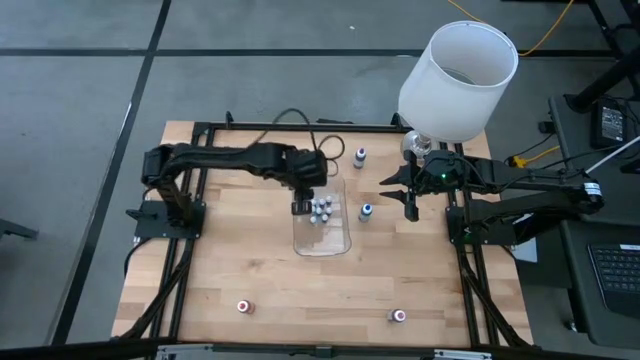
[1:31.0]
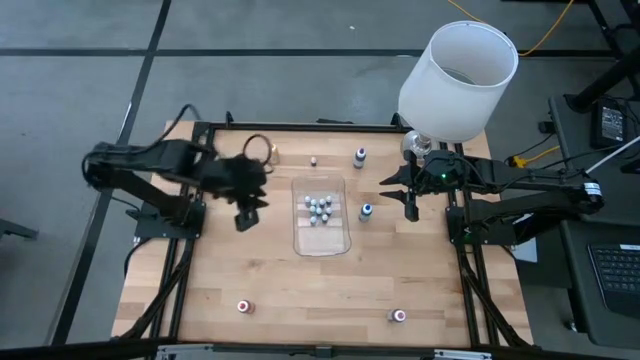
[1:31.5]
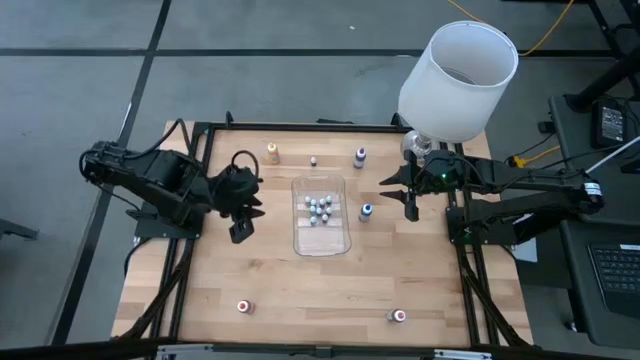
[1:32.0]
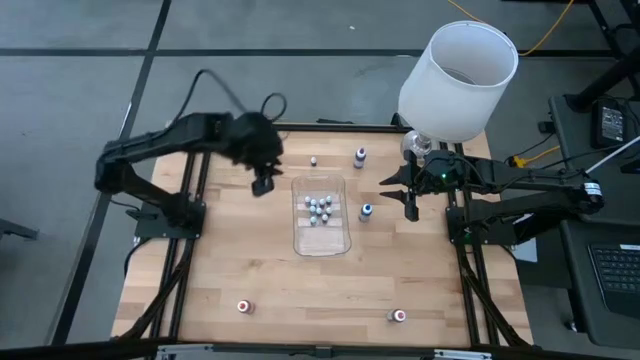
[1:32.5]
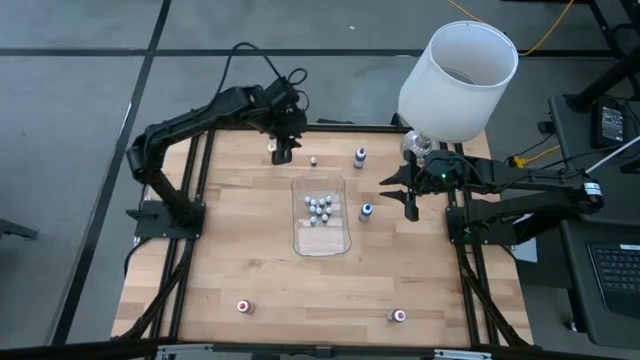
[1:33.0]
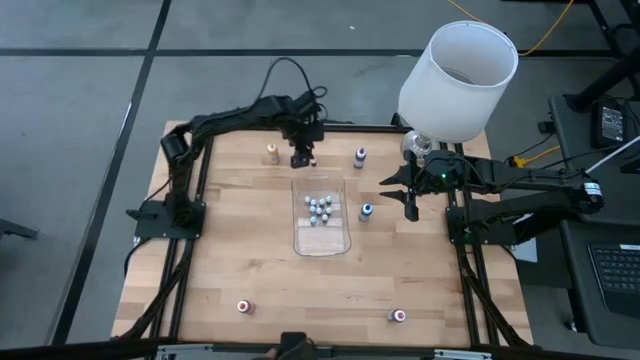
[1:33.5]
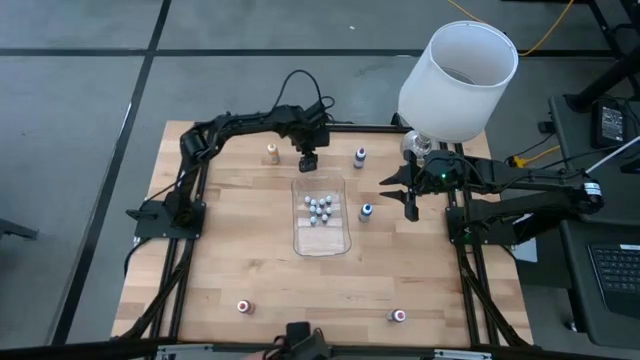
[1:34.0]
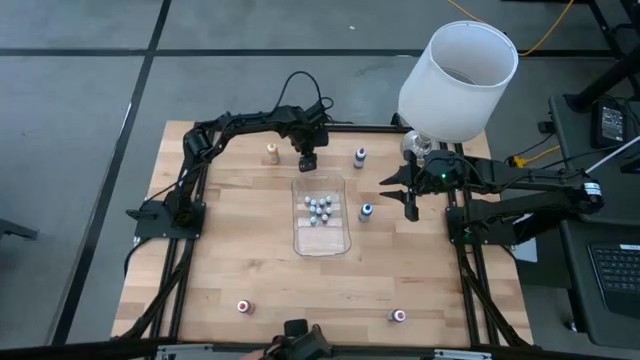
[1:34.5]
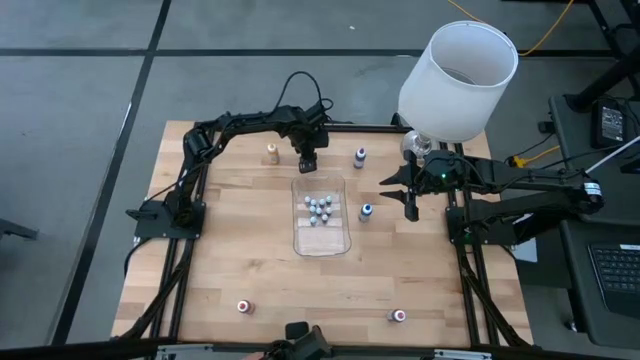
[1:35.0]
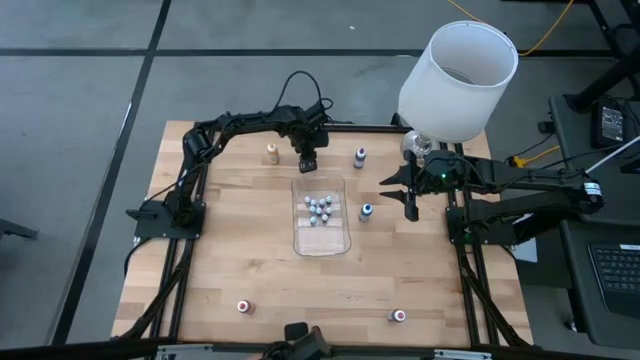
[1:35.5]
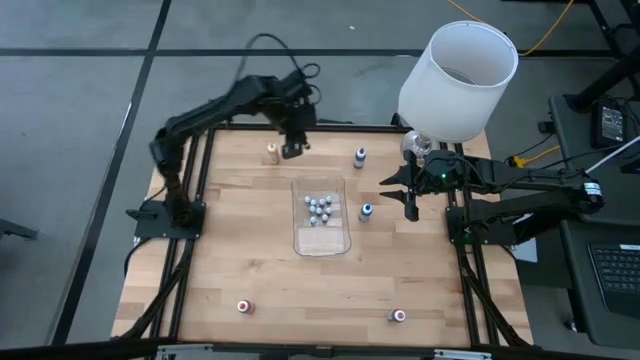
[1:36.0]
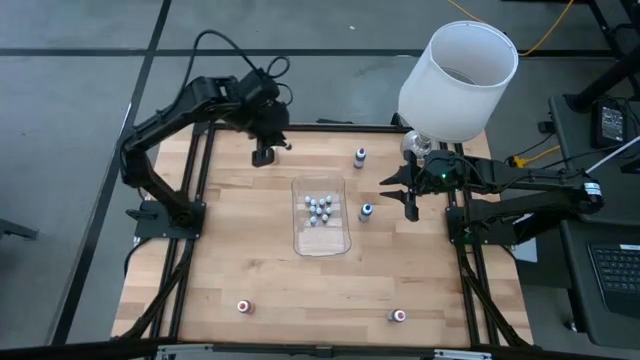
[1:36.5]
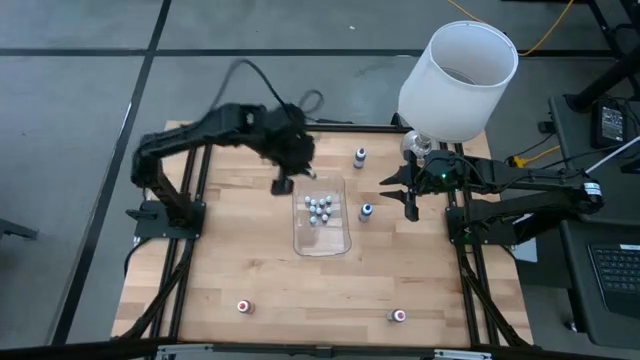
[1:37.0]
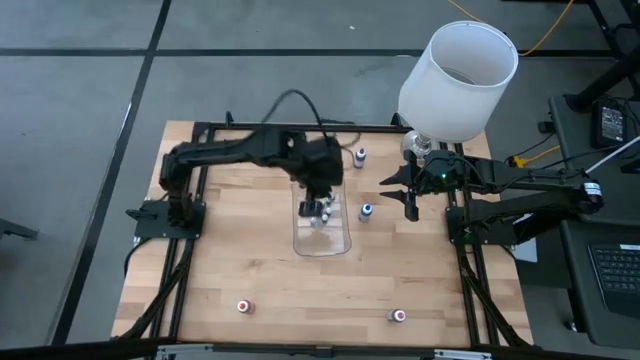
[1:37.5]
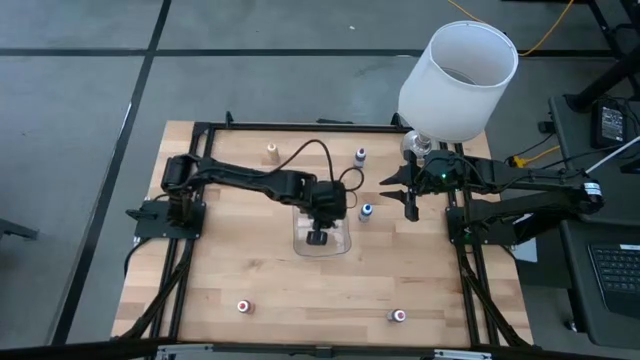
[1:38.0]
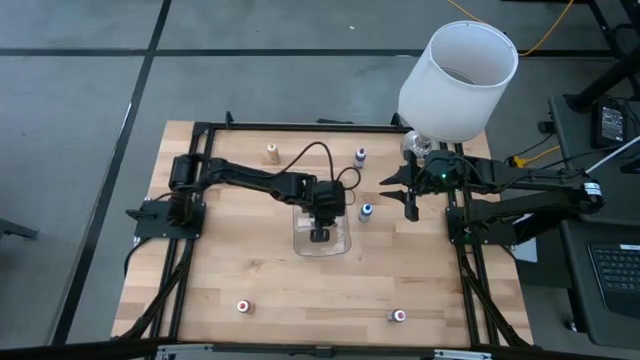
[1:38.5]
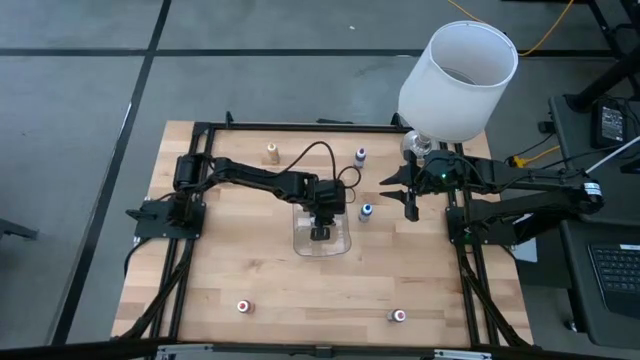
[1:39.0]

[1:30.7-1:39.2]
Task: Pick & Place food coloring
Put the small blue food coloring into the transparent bin

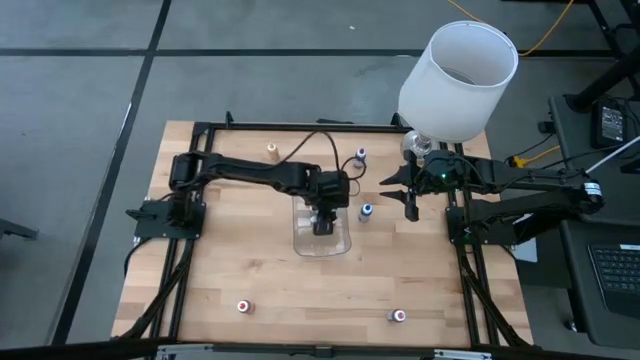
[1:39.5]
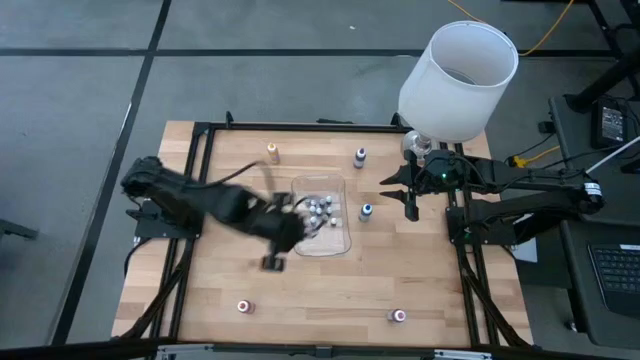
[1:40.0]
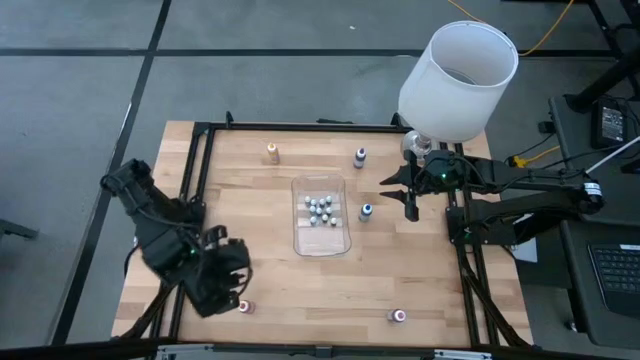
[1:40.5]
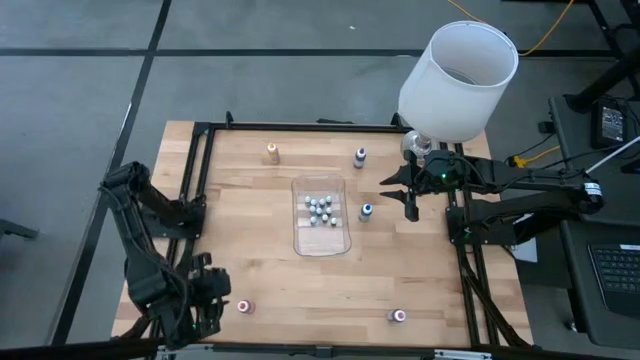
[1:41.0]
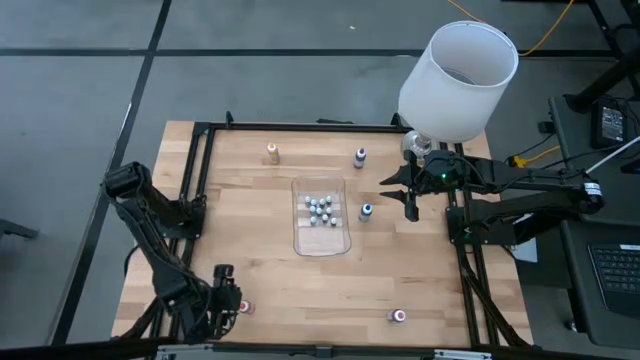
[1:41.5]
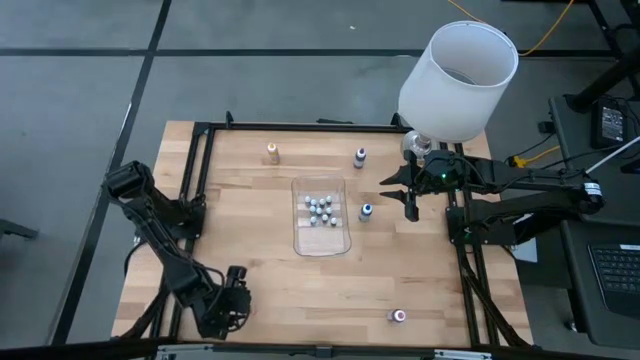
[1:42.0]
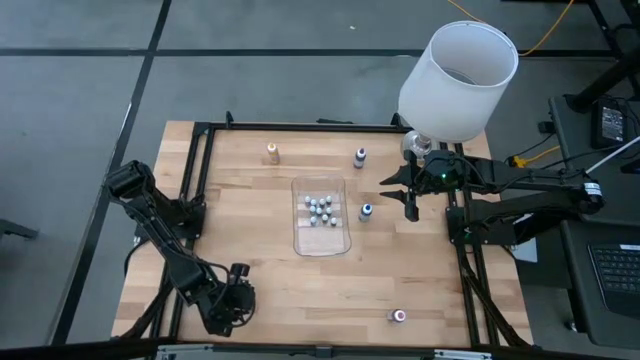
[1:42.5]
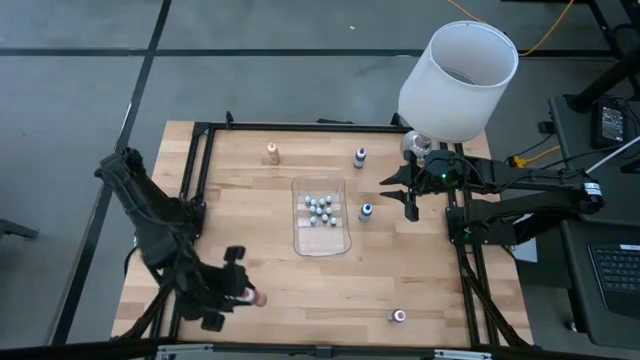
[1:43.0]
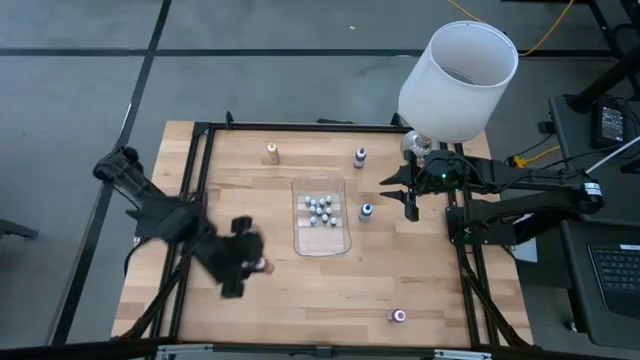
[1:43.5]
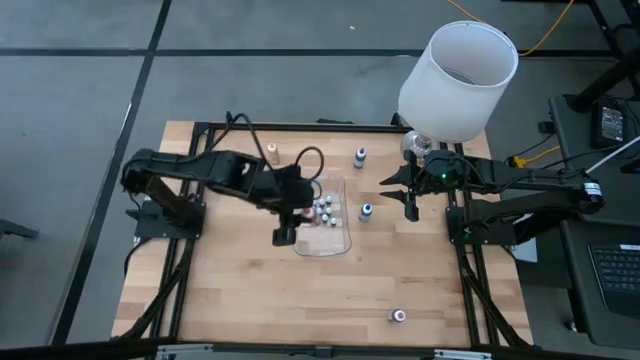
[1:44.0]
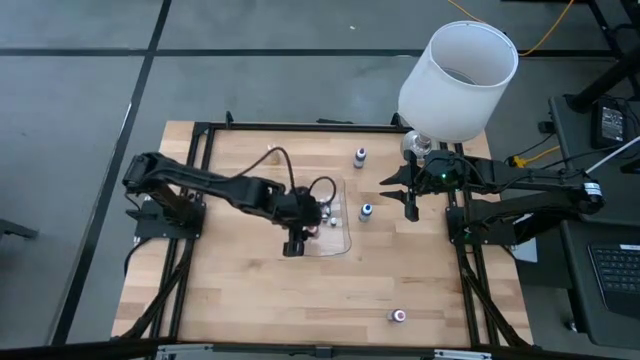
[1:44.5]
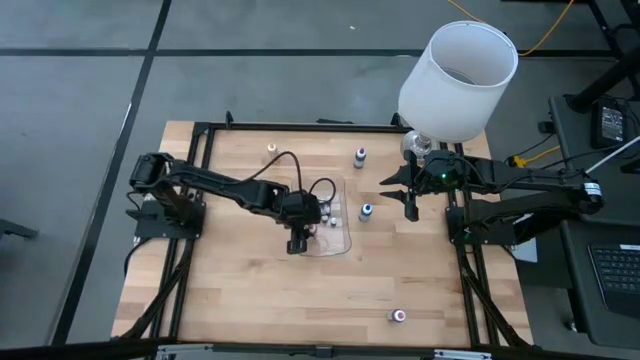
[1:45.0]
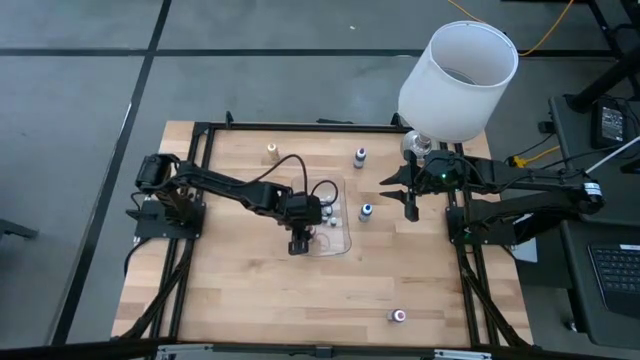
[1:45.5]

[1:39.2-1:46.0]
Put the large red food coloring into the transparent bin

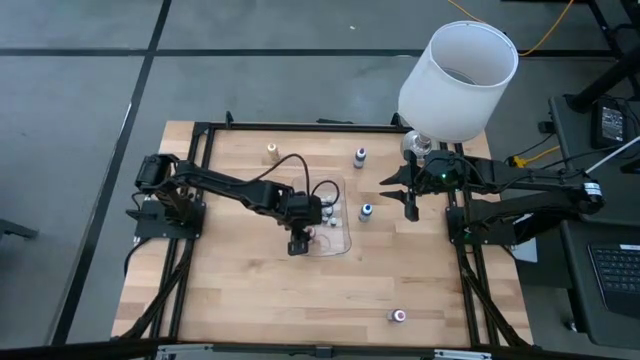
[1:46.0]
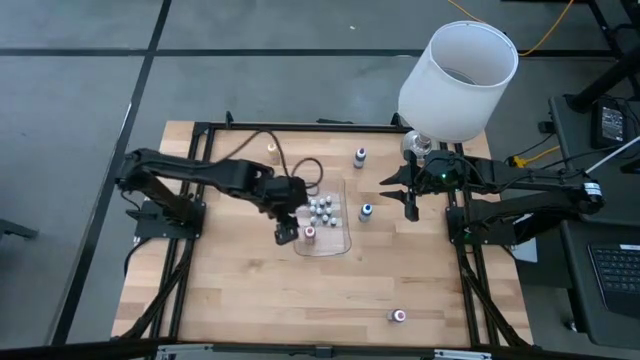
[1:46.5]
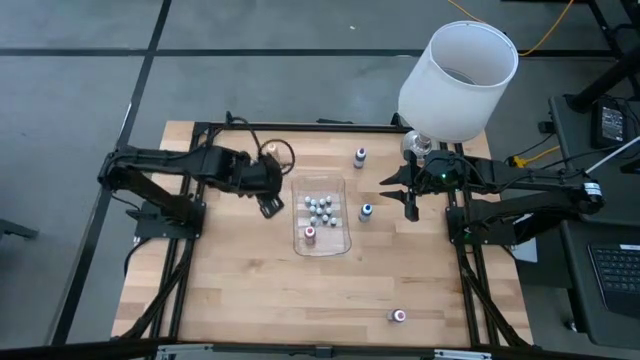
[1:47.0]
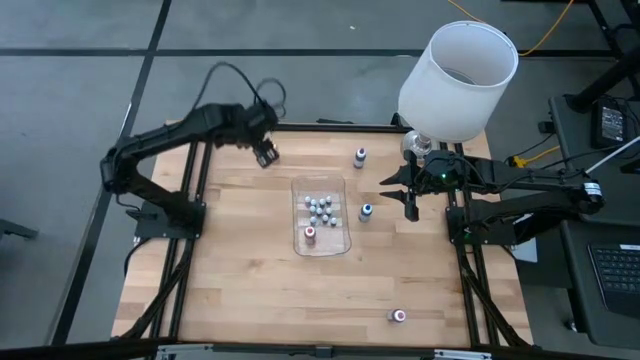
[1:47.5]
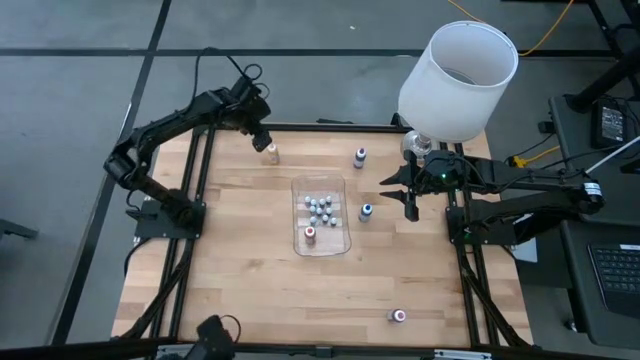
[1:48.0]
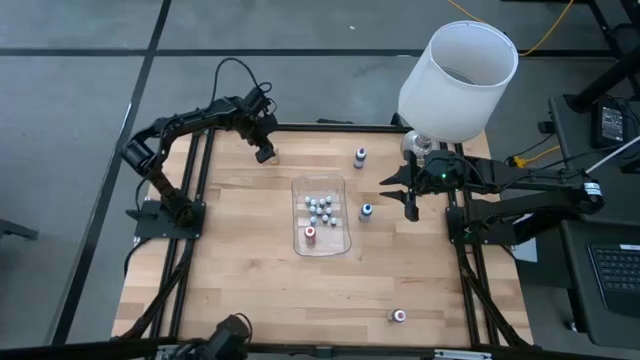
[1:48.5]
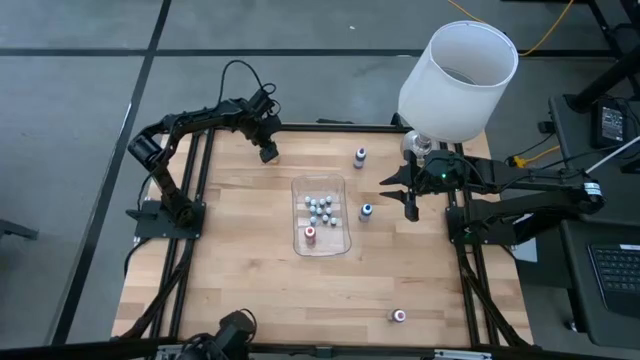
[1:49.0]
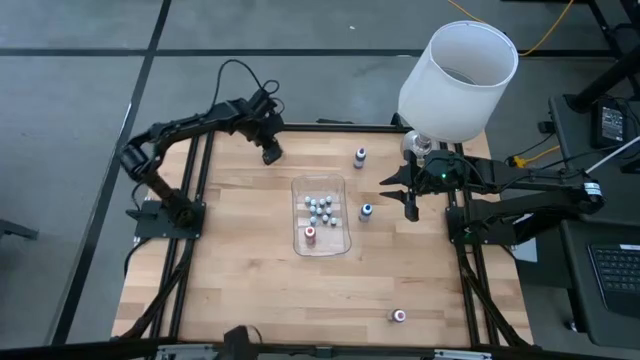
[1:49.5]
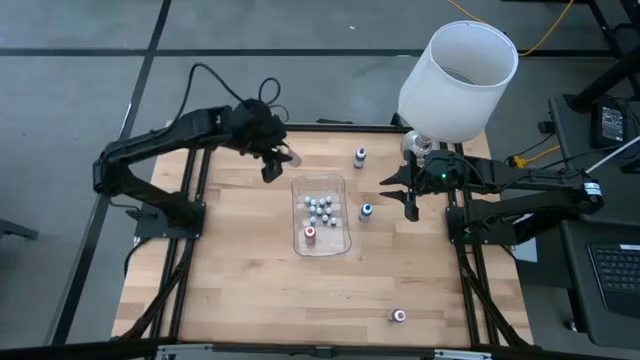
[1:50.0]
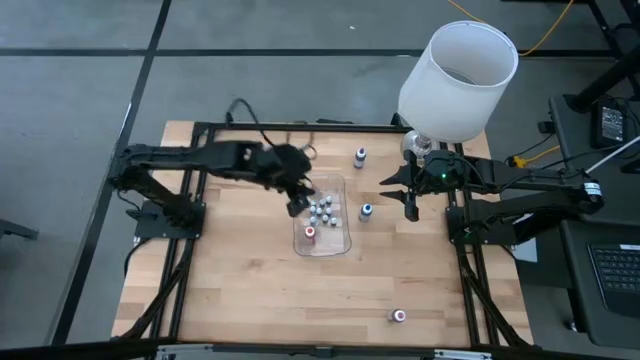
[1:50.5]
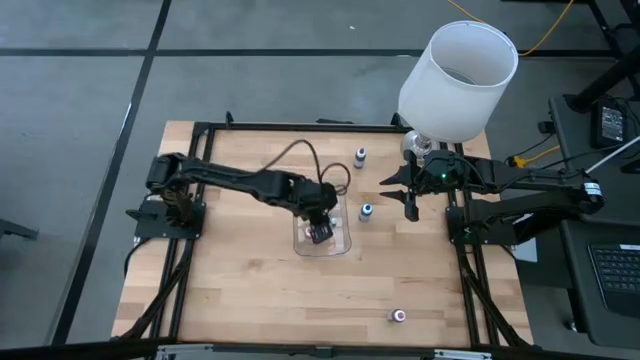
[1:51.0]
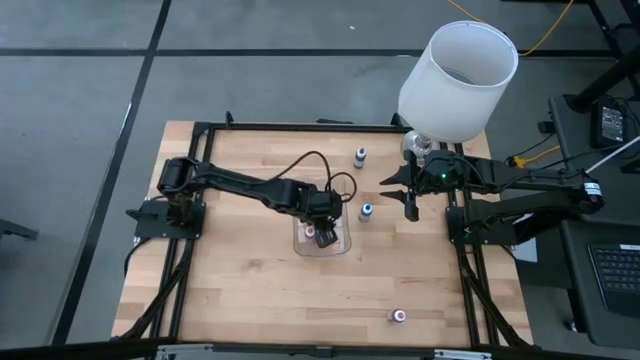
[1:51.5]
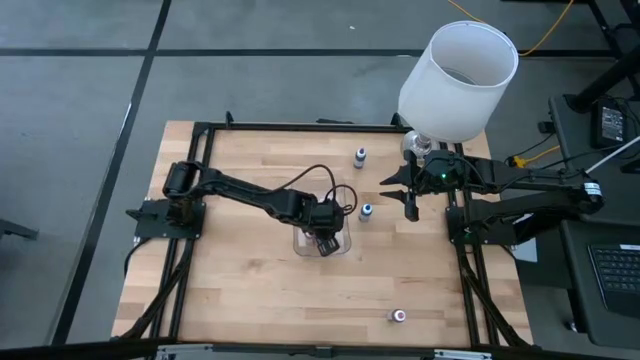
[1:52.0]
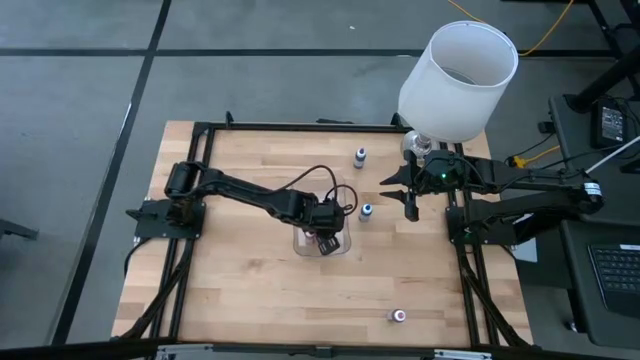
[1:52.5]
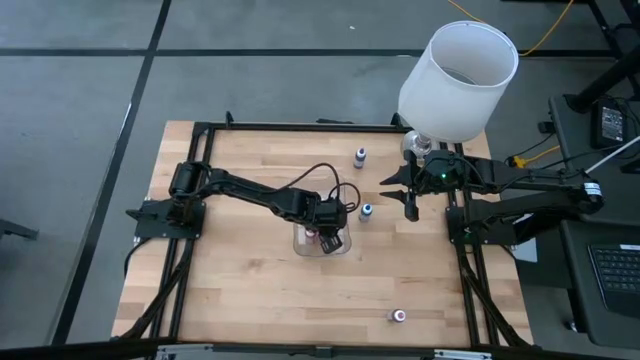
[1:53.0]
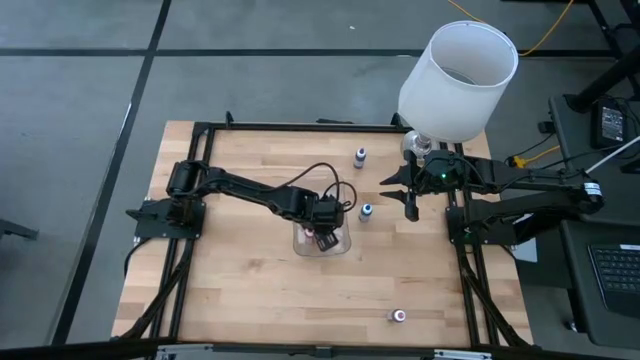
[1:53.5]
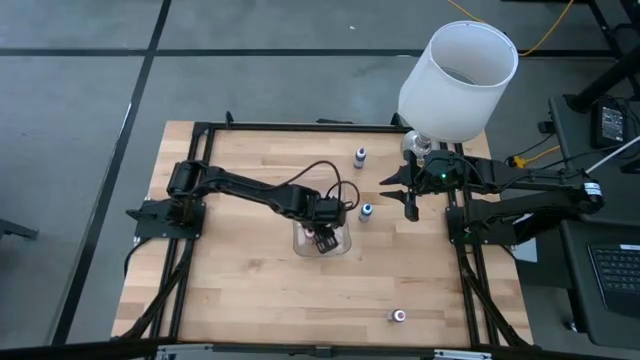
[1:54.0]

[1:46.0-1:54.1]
Put the large yellow food coloring into the transparent bin
